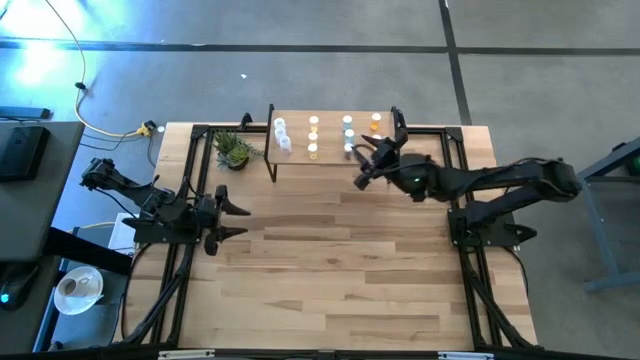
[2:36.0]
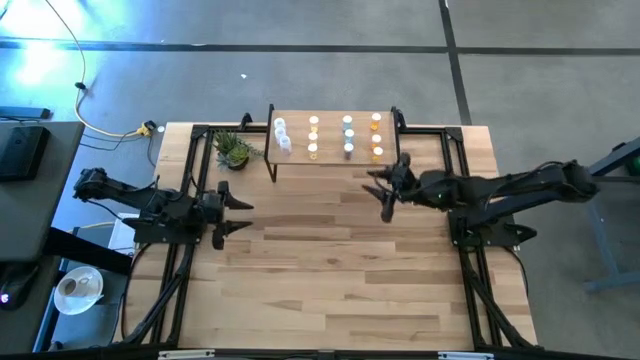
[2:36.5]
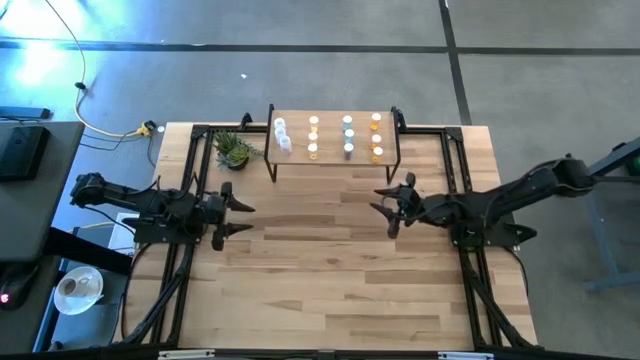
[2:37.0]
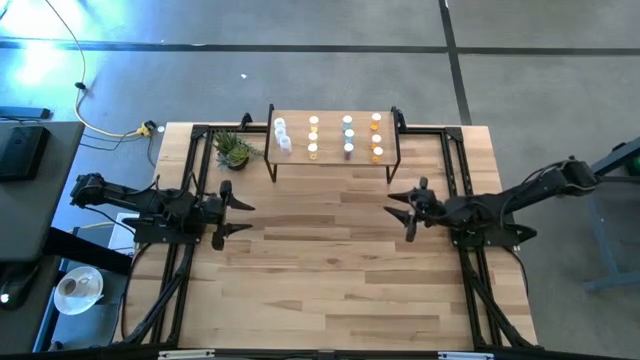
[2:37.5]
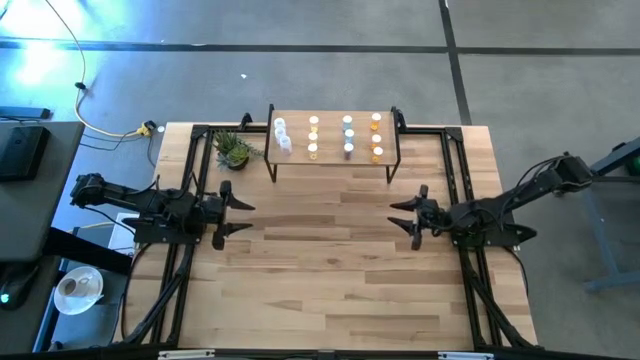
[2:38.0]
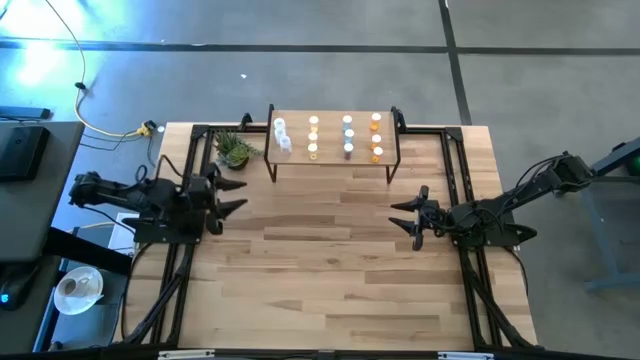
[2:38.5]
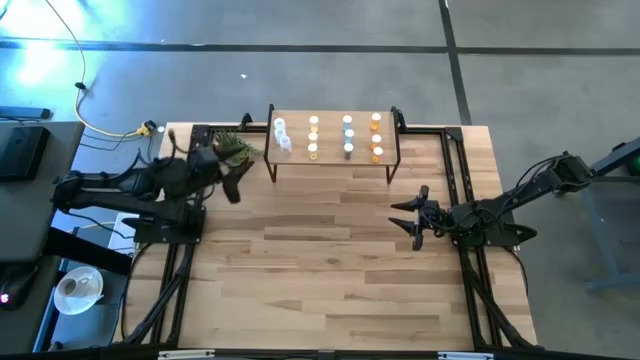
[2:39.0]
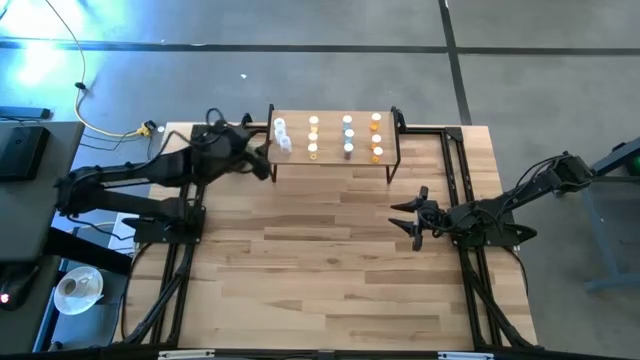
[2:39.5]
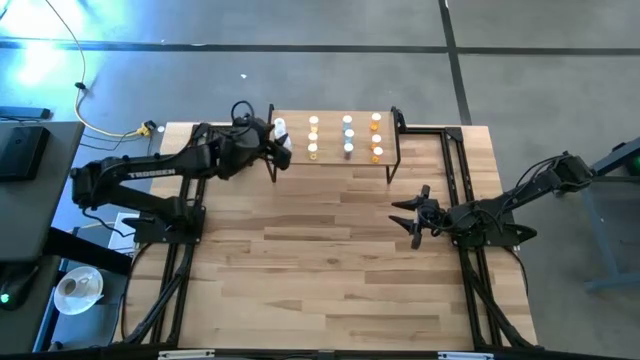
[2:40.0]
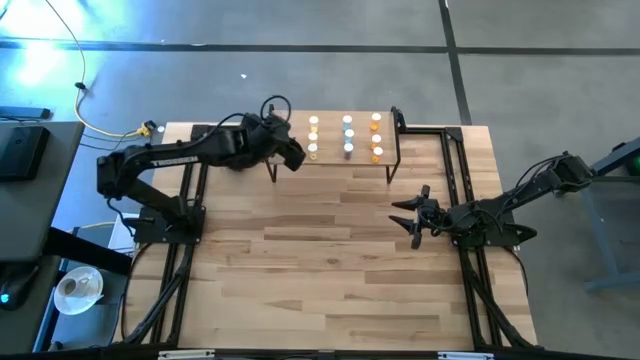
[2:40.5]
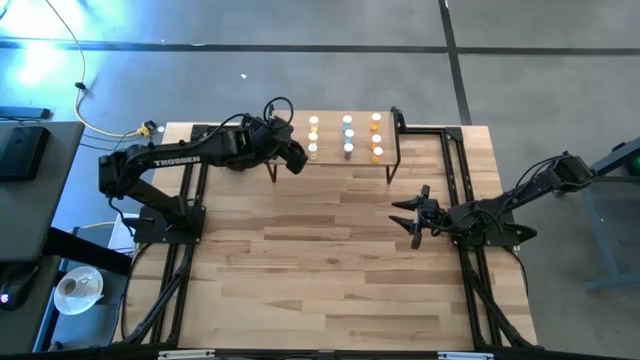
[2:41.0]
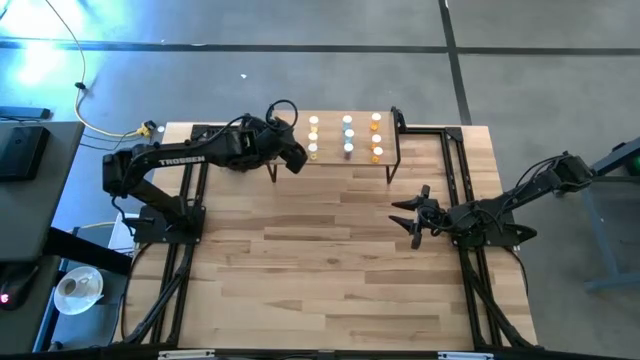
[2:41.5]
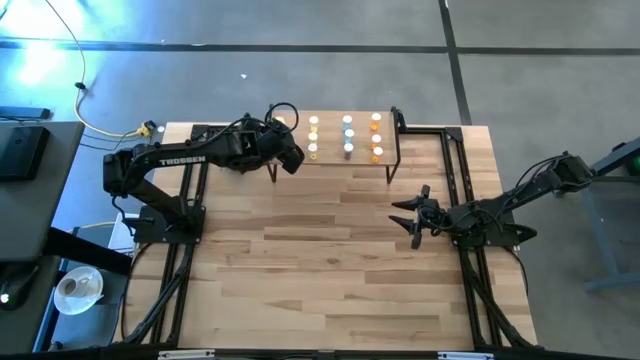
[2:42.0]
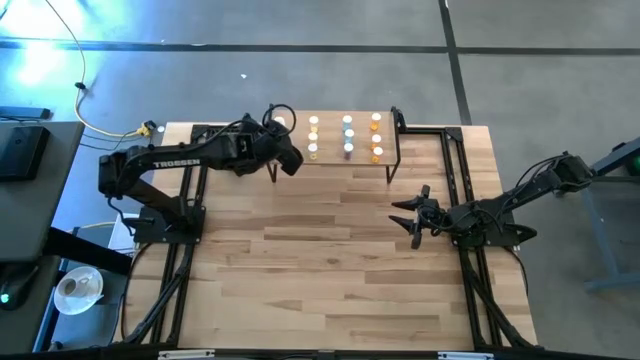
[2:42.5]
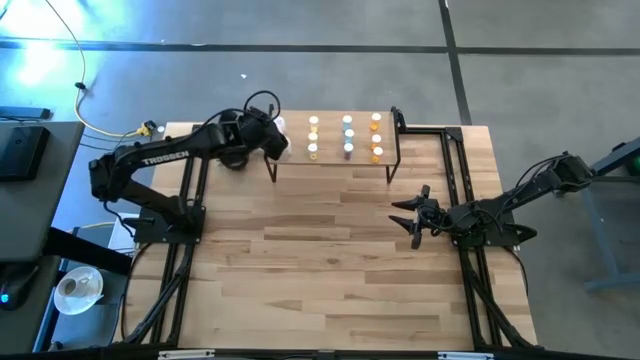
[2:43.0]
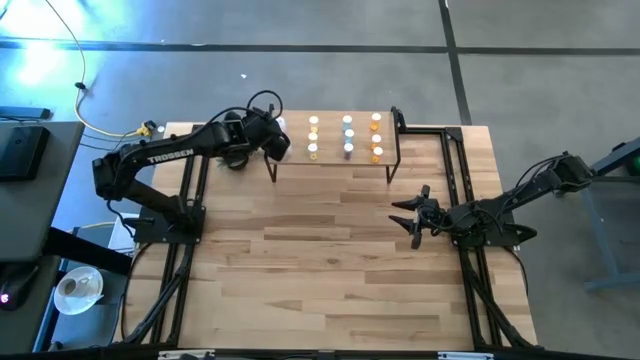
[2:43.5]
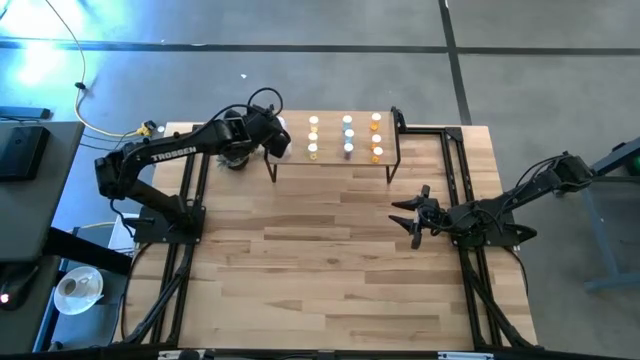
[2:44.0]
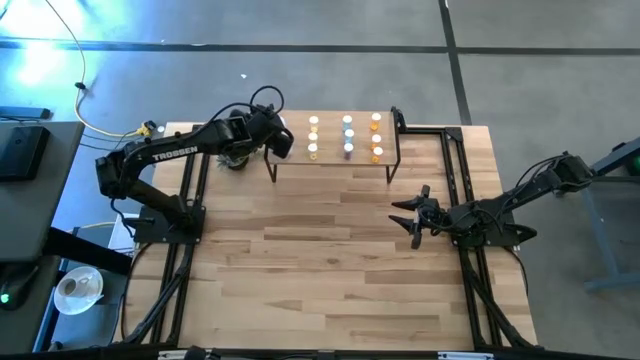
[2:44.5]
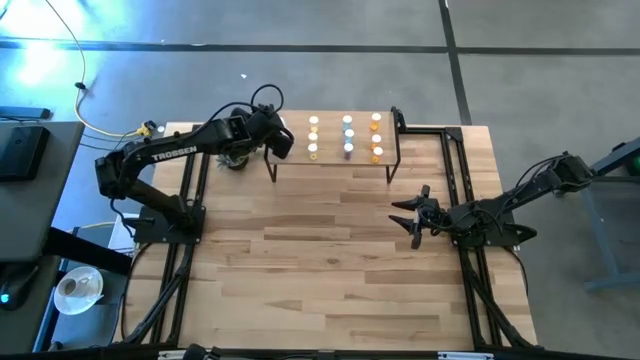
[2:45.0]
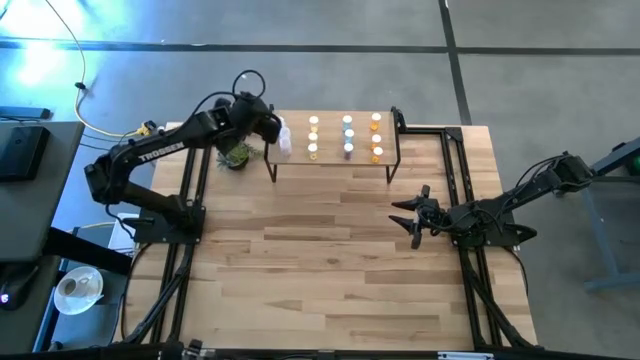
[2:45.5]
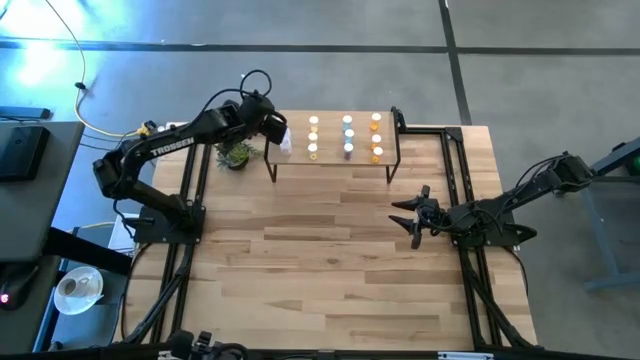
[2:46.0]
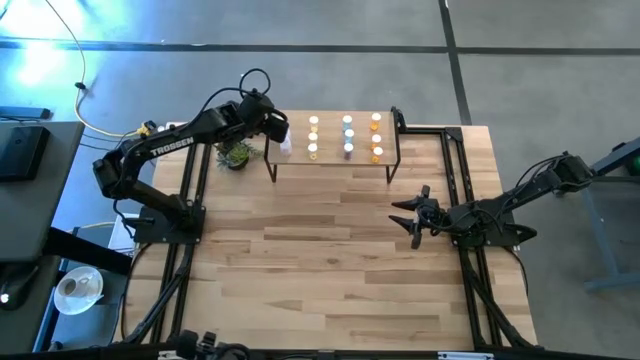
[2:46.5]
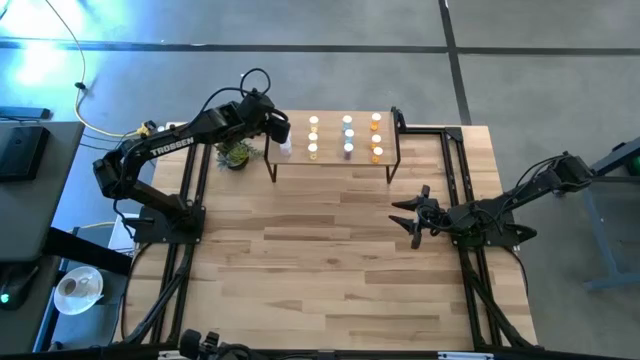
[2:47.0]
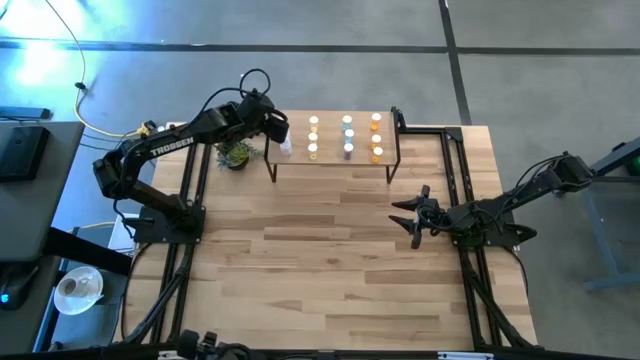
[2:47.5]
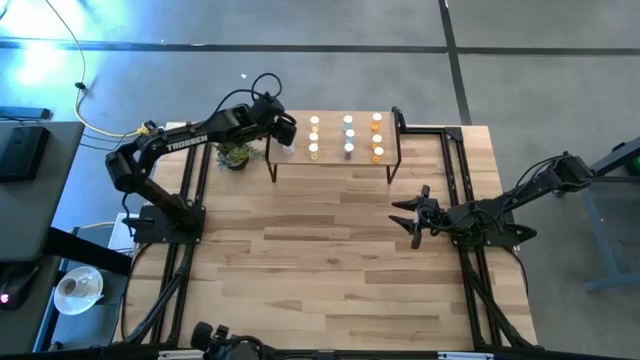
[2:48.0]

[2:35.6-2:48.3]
Task: Pick and place medicine bottles onto shelf by color
Adjust the transparent pill bottles on the shelf

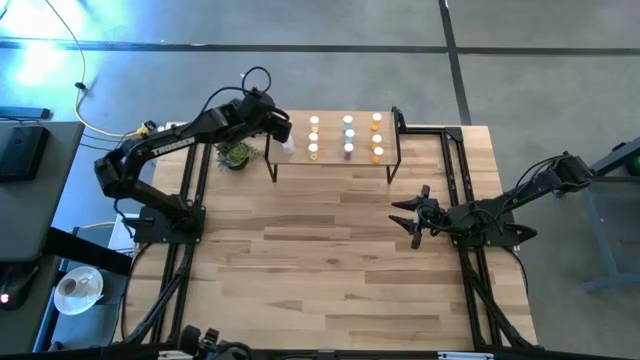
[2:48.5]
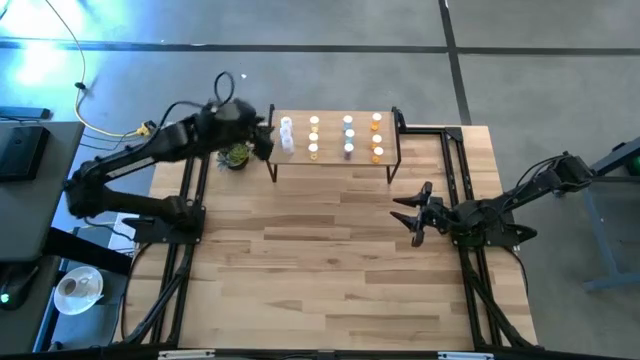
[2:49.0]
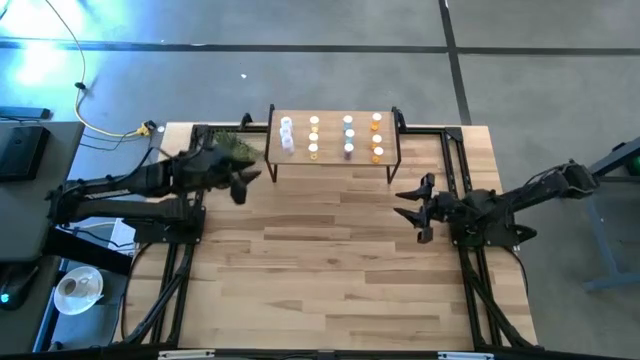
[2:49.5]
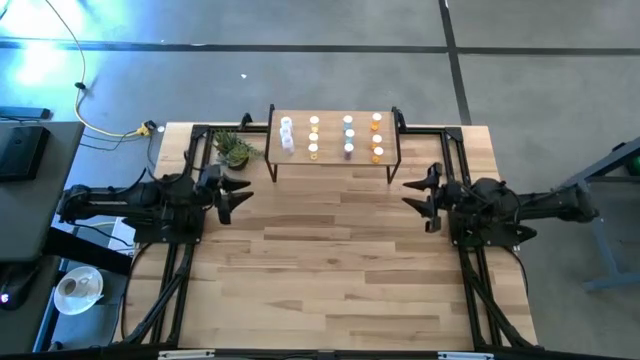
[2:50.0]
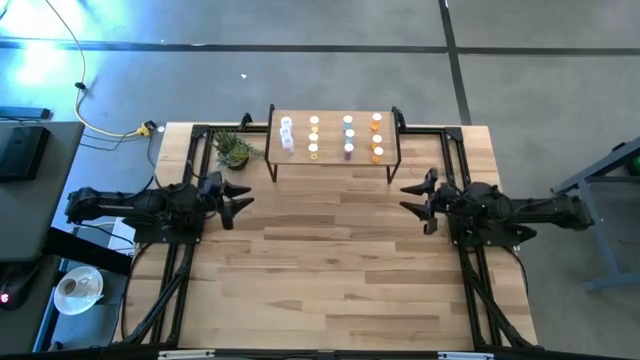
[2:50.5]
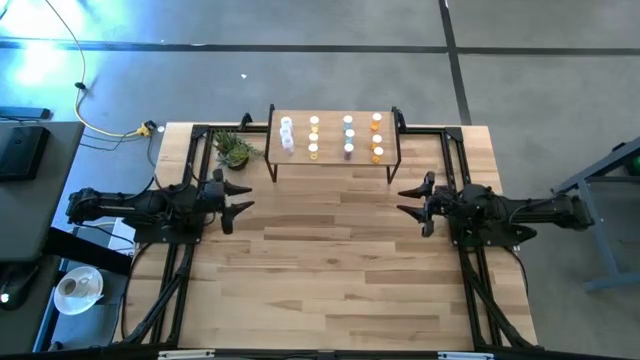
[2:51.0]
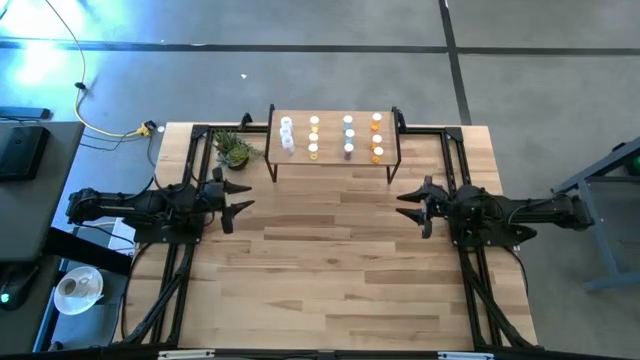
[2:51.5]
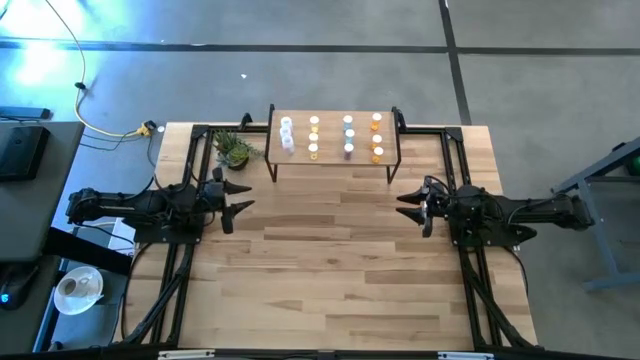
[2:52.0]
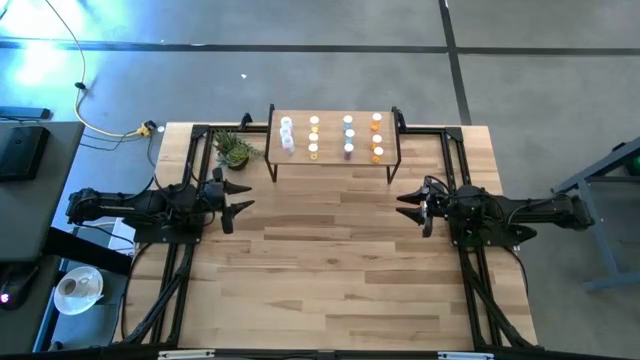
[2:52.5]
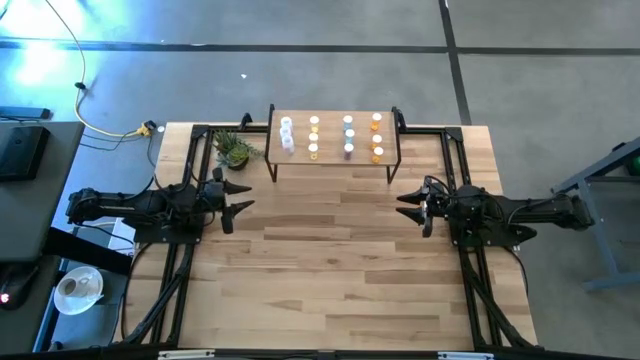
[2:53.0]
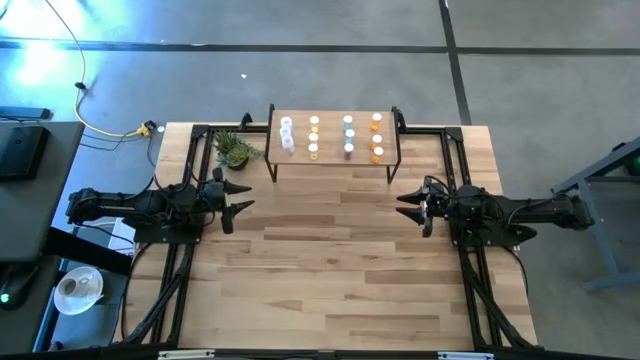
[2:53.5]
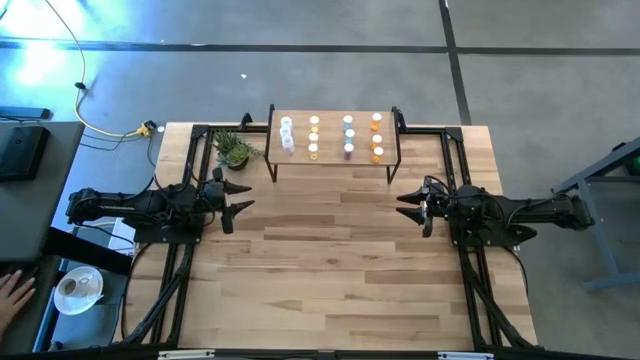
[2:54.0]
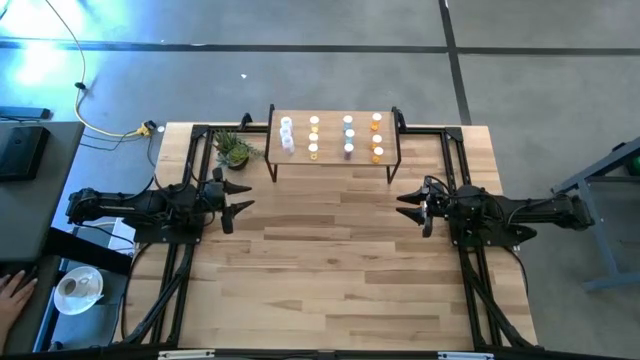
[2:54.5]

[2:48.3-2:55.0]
Return to Home Position

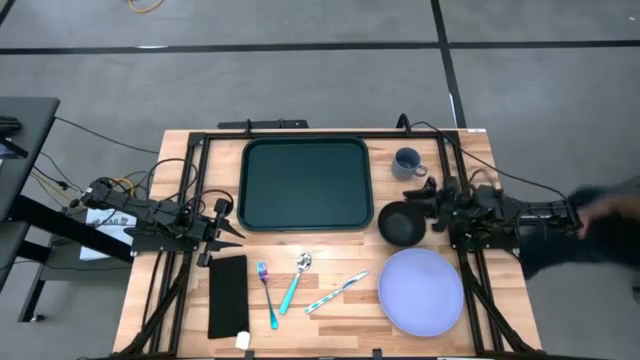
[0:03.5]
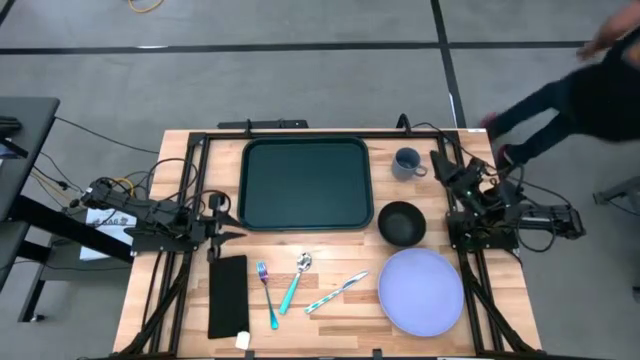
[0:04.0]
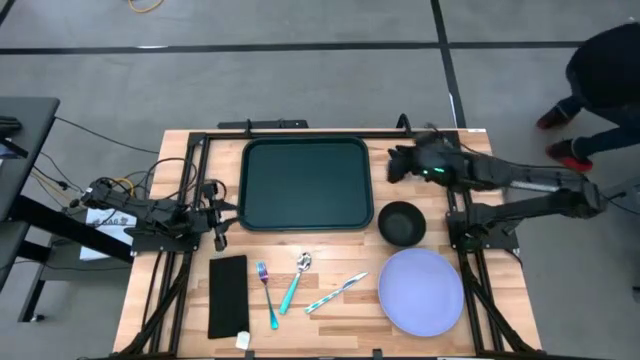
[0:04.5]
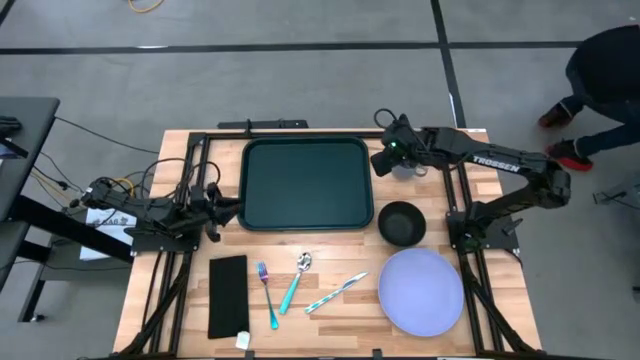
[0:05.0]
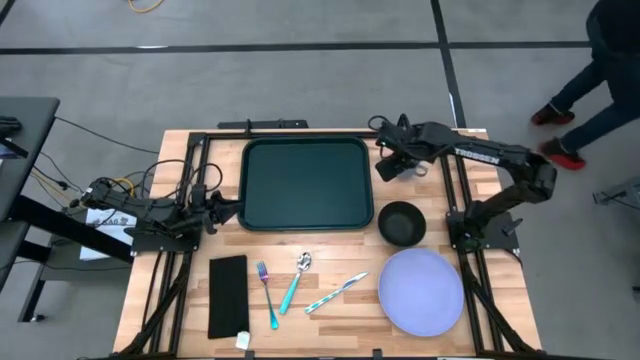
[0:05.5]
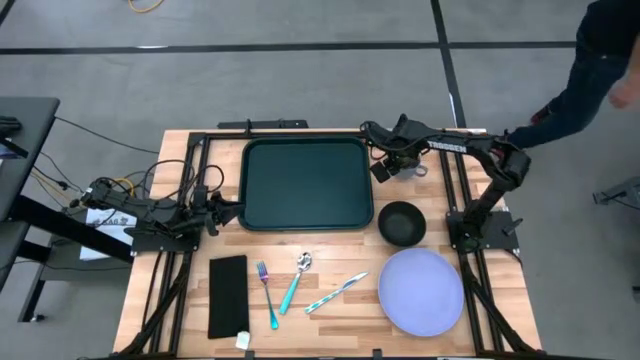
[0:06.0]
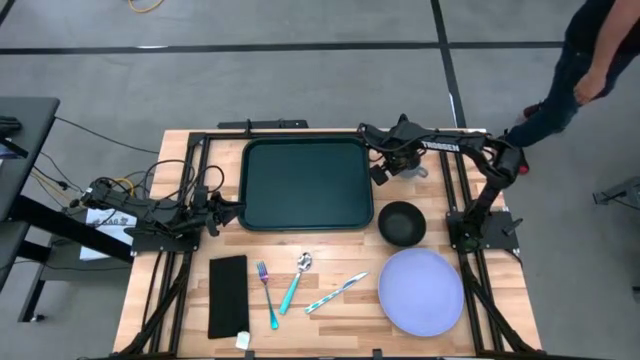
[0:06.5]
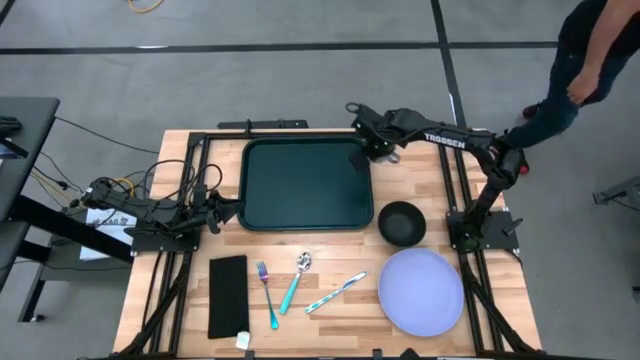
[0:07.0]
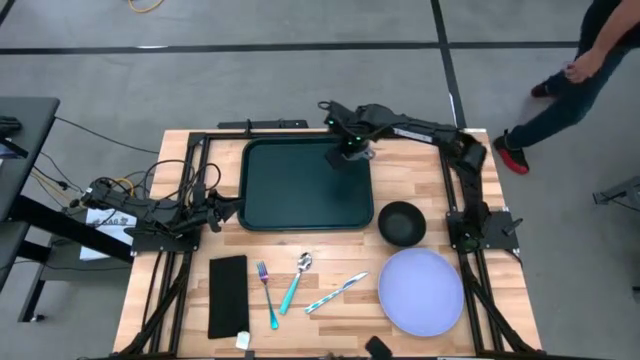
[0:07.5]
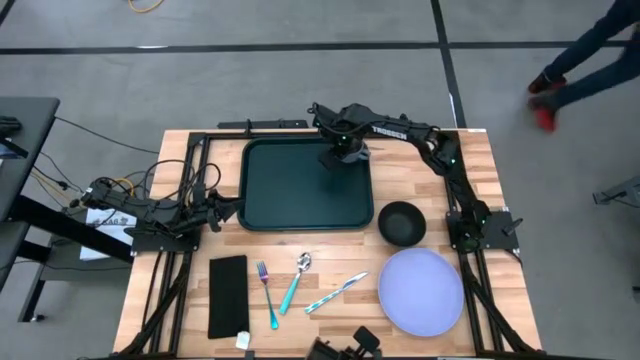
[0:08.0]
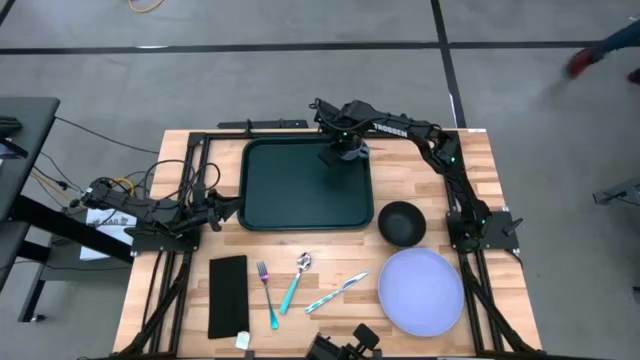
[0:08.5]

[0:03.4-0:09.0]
Task: Set up tray
Put the gray mug on the tray
